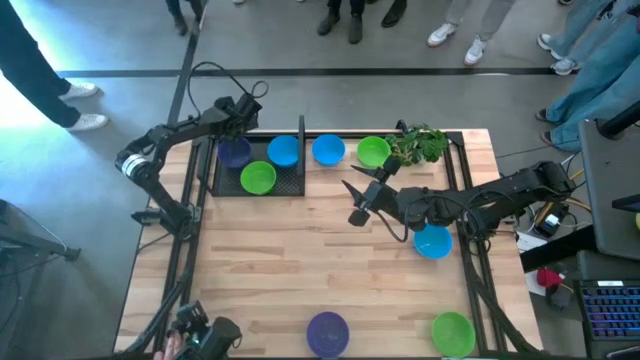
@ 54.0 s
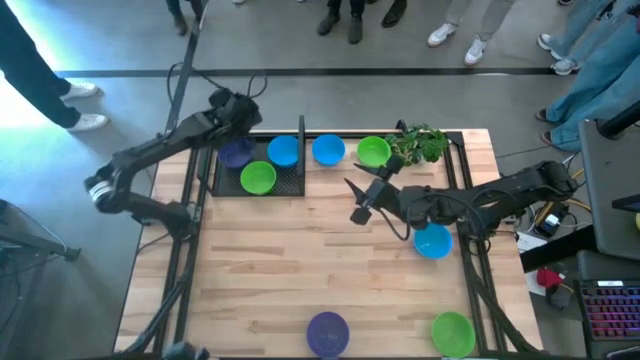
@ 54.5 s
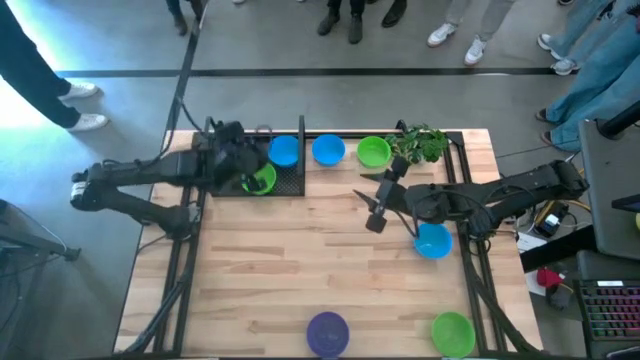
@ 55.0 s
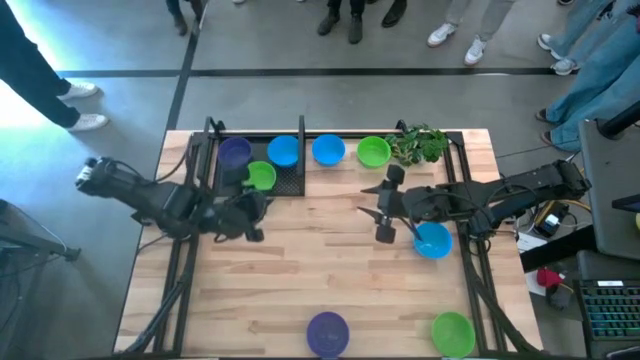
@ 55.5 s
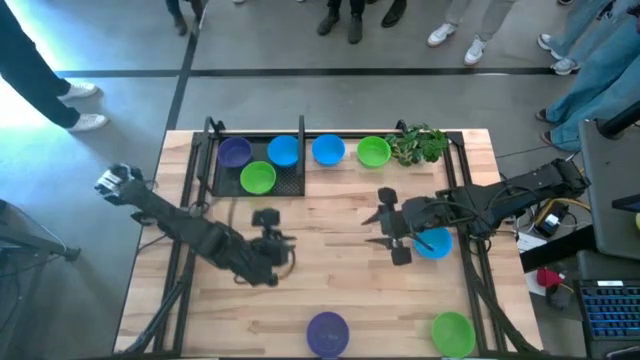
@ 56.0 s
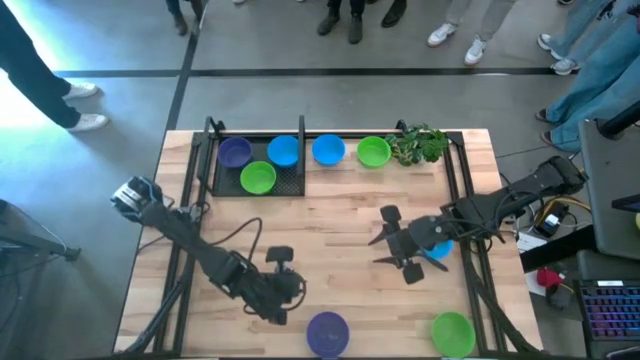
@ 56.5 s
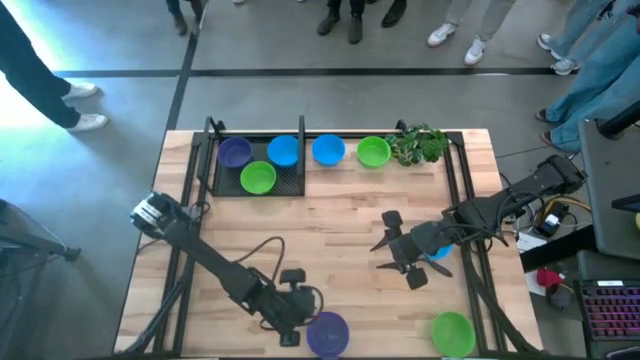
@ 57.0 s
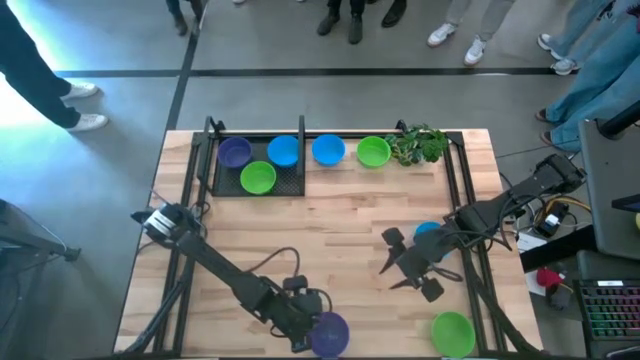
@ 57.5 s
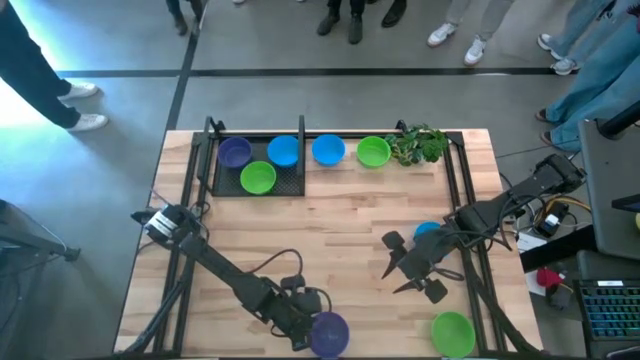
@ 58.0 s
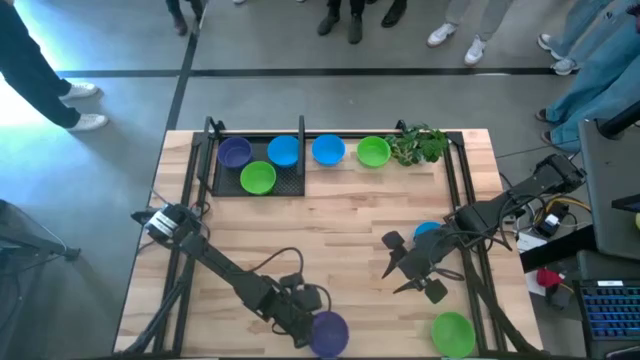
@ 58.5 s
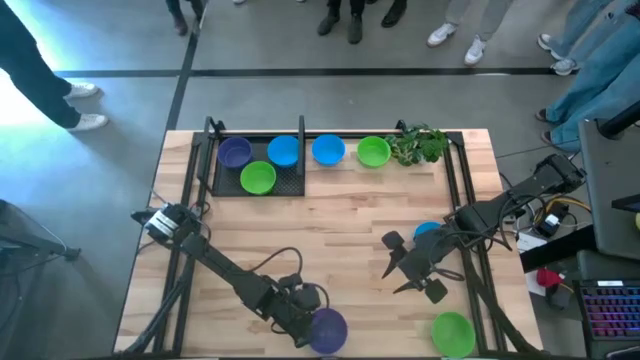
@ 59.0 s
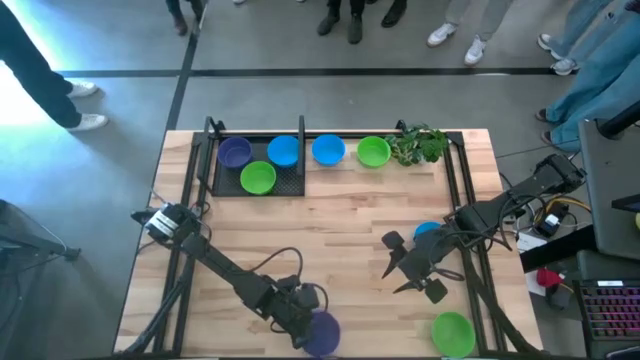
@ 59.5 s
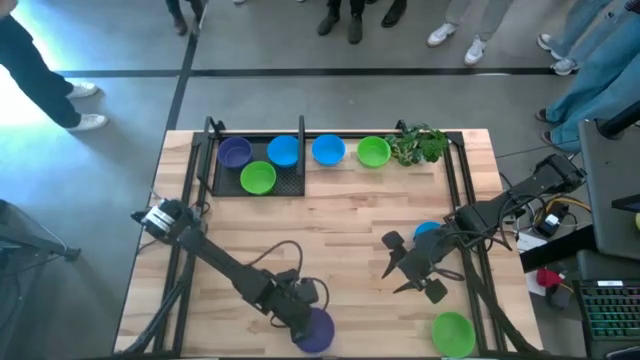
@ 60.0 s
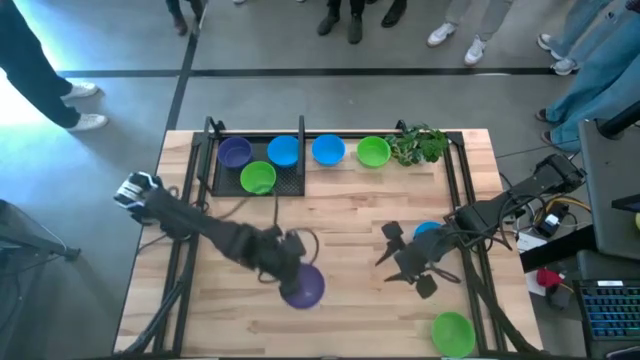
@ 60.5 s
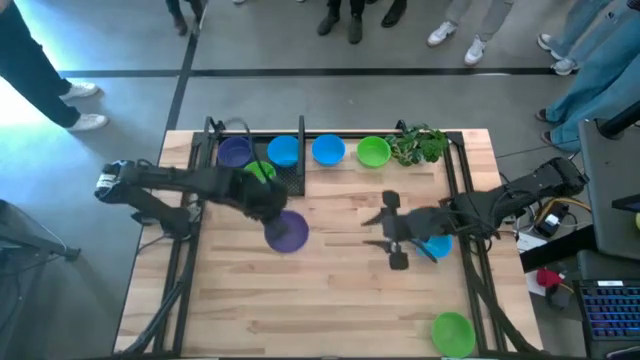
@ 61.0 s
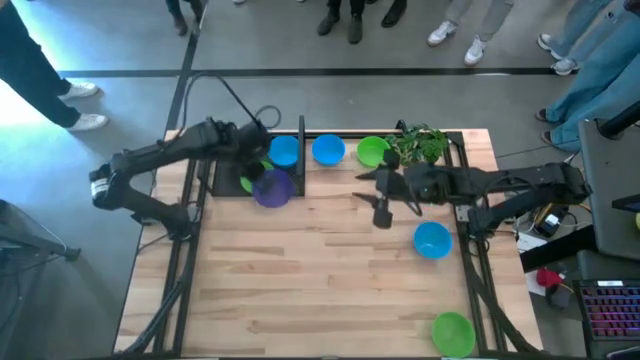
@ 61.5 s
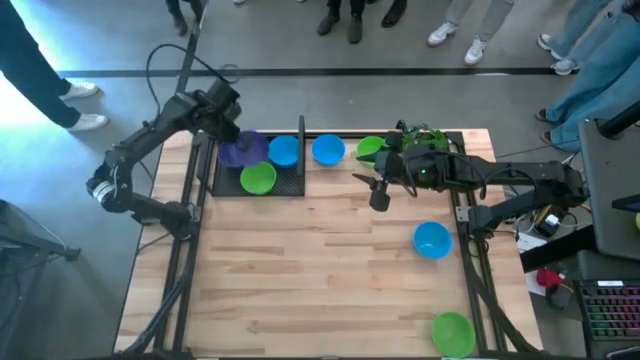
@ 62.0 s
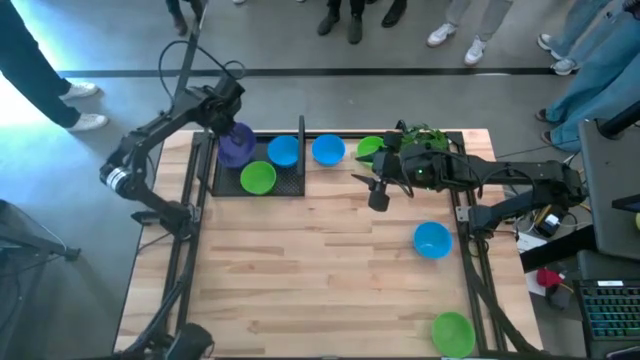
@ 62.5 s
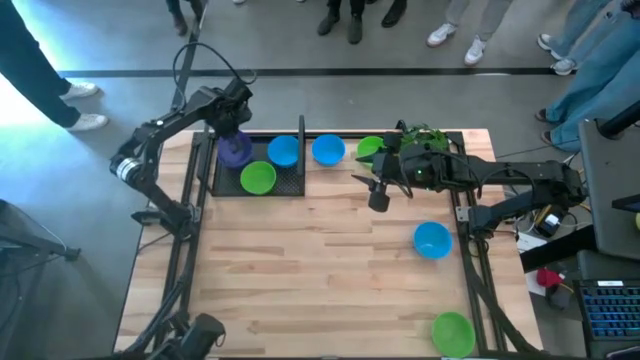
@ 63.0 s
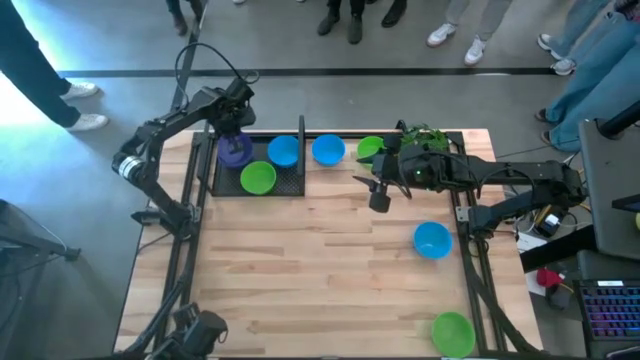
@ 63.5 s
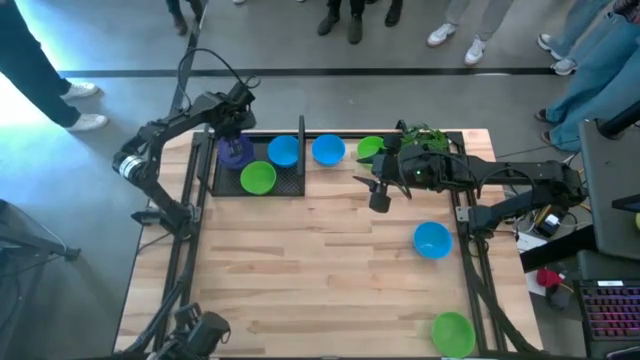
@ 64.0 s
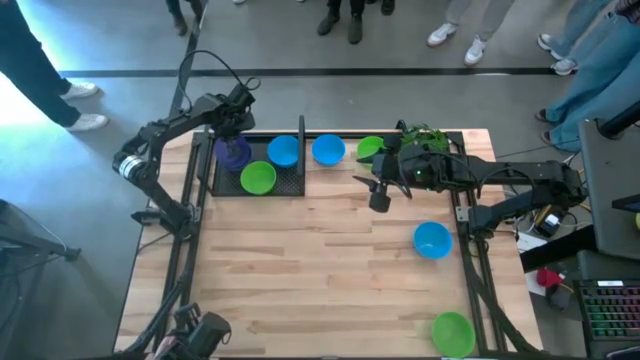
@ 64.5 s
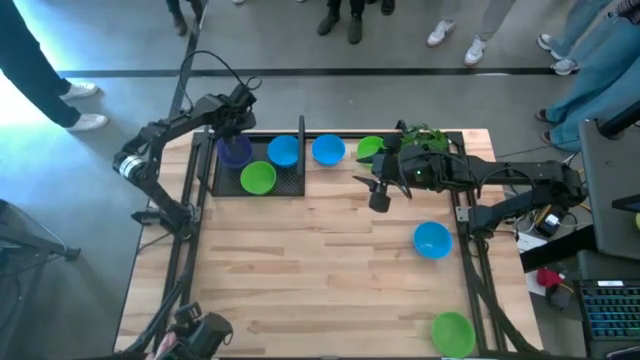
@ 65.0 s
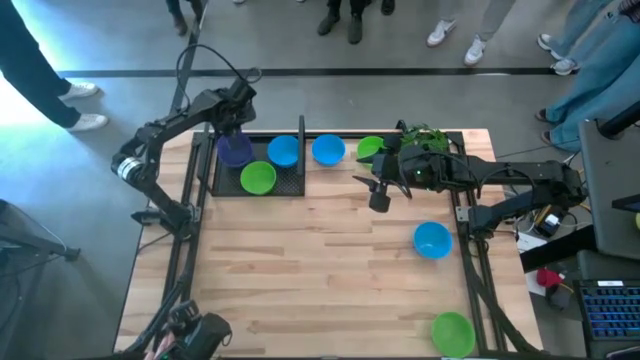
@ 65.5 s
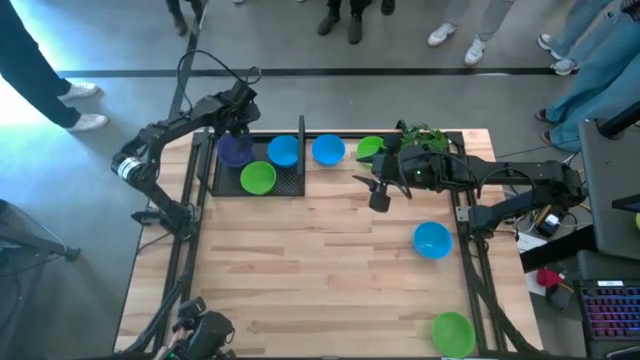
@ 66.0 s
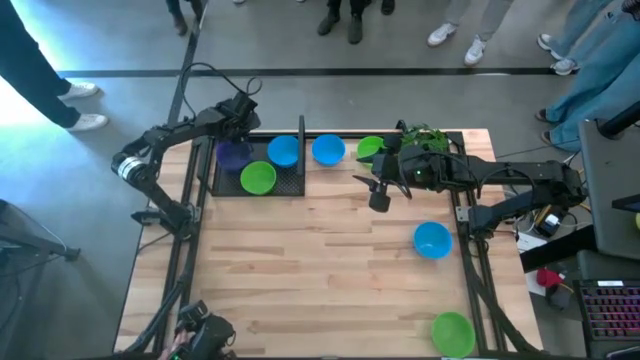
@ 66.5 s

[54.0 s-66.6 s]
Task: Pick & Place Mini bowls
Stack the purple bowl on the purple bowl on the shelf

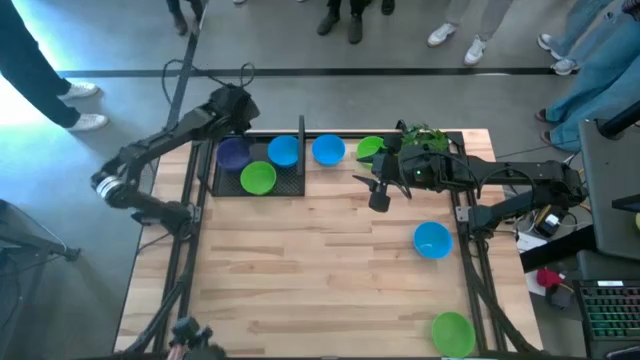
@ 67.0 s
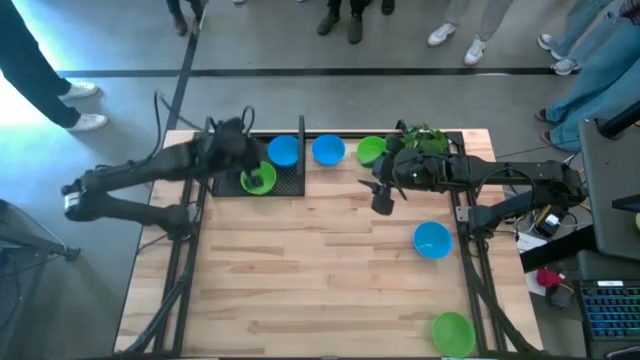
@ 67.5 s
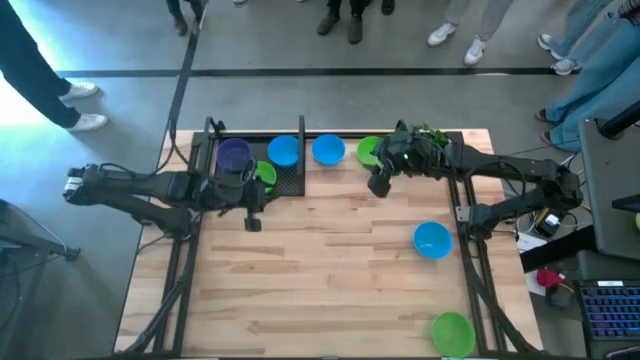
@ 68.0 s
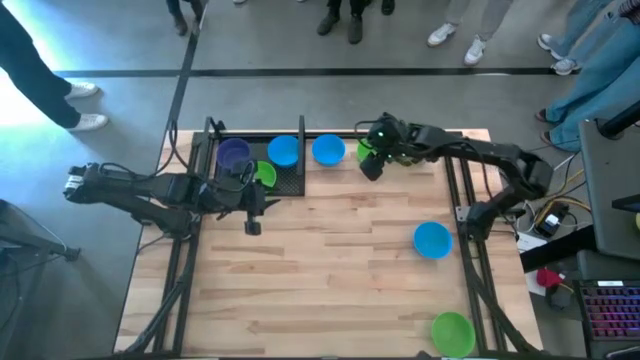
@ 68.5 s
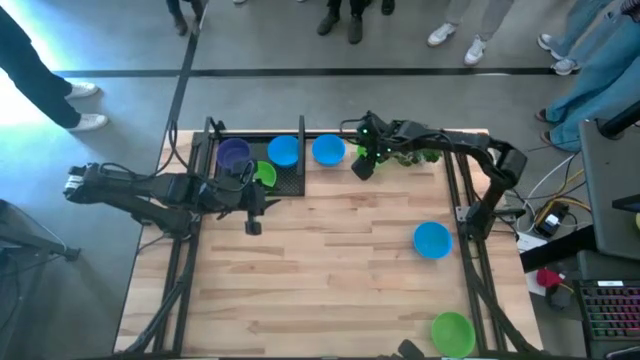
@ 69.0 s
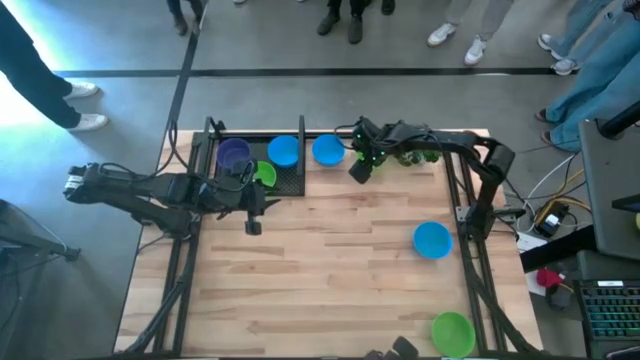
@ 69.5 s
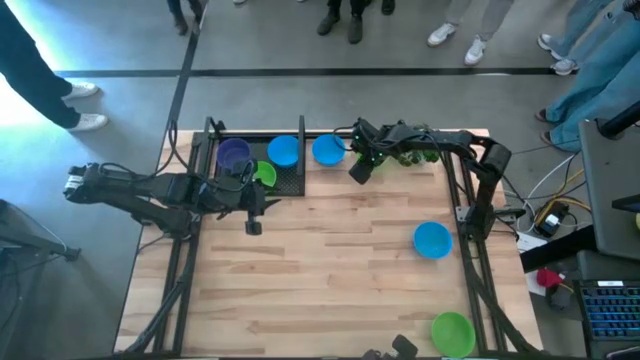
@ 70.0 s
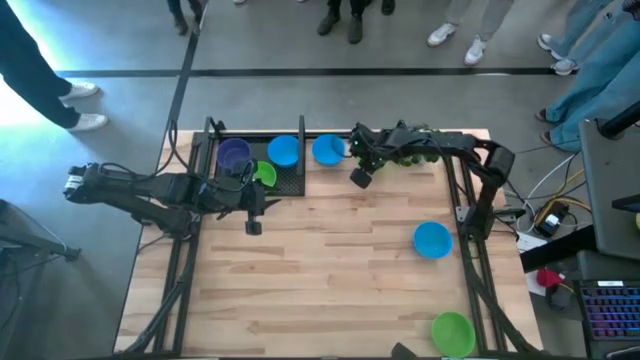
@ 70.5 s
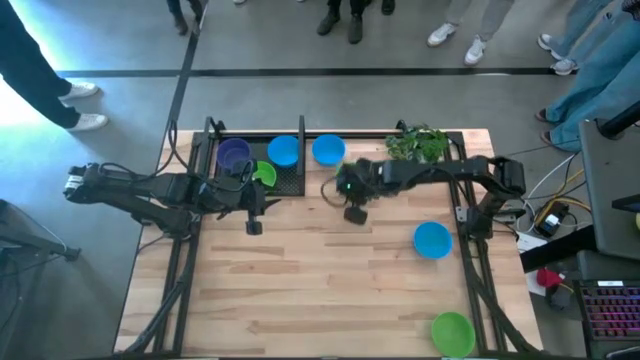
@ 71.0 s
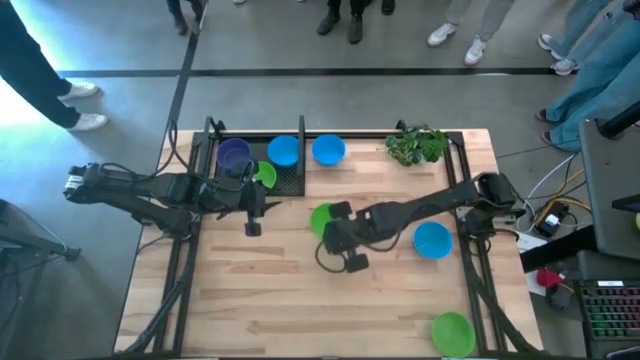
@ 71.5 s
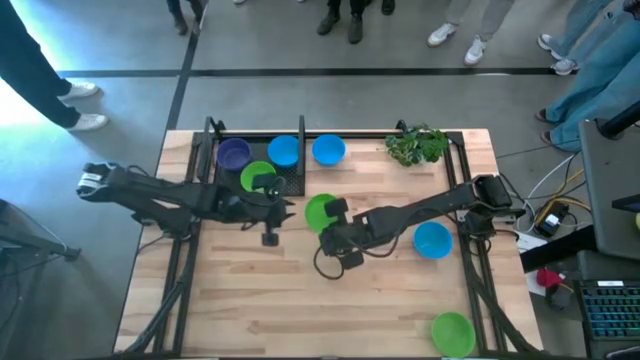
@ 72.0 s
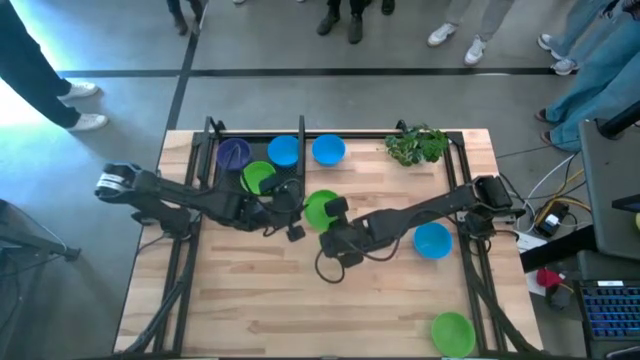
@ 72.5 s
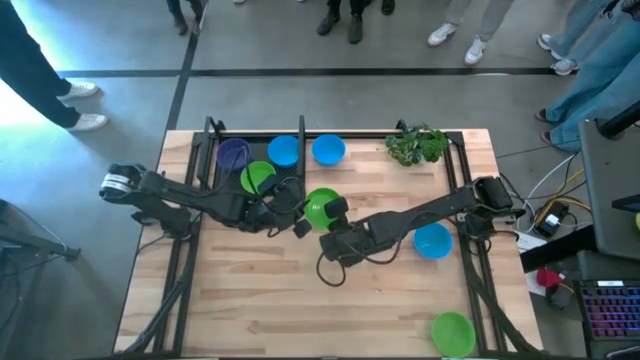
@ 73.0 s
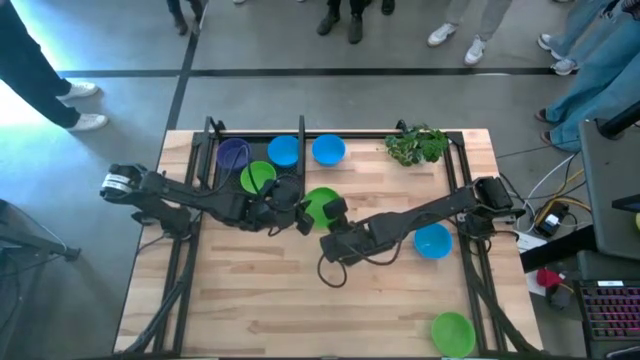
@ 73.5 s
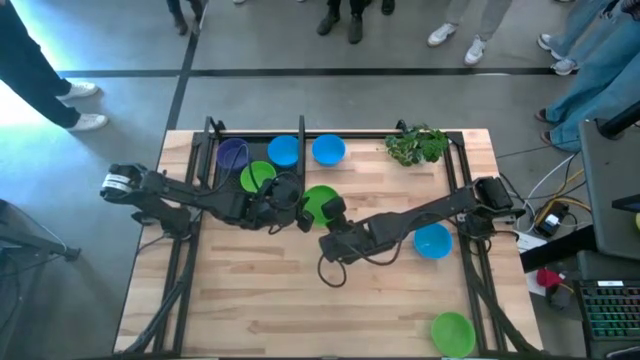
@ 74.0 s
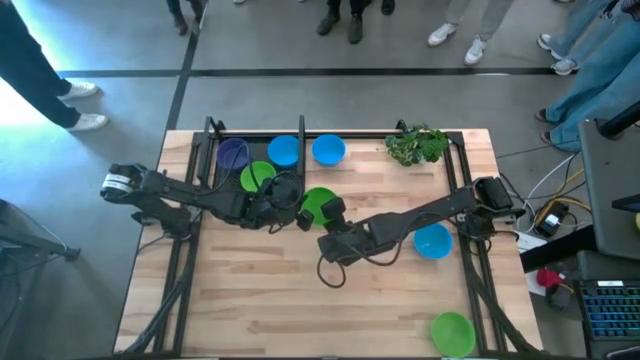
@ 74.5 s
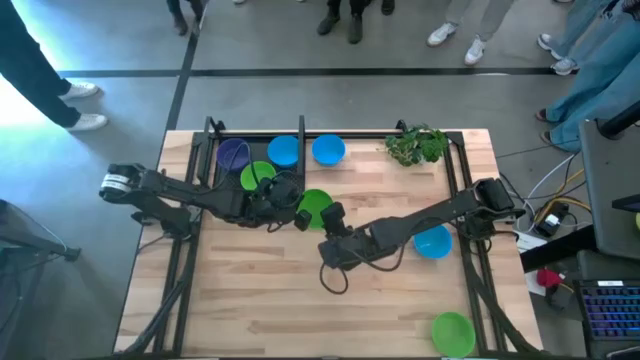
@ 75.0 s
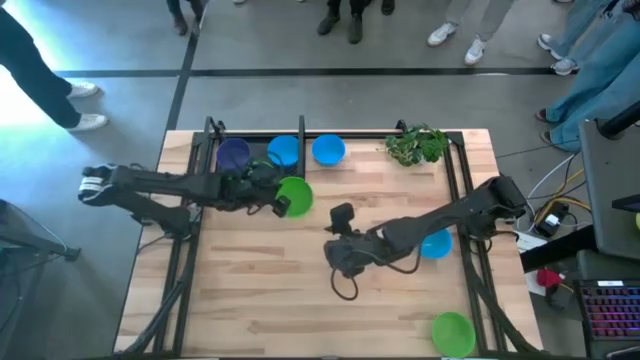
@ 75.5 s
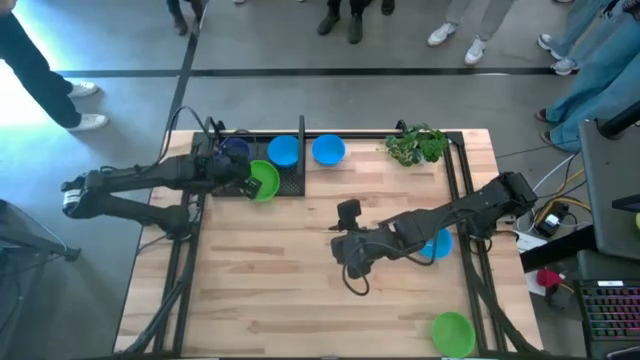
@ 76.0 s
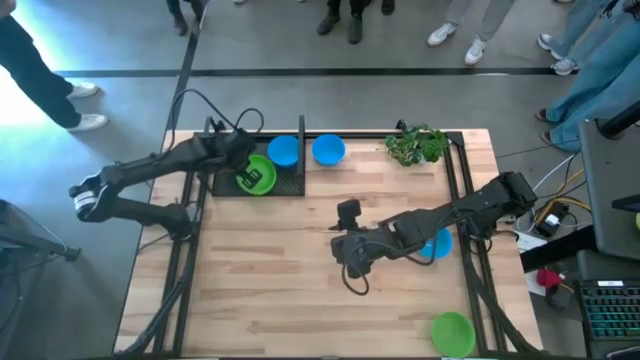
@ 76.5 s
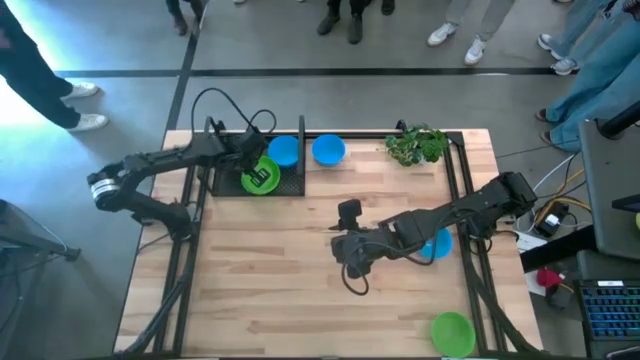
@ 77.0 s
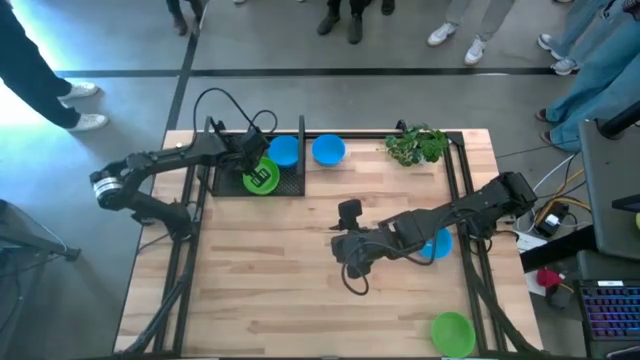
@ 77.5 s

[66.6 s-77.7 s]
Stack the top green bowl on the green bowl on the shelf
